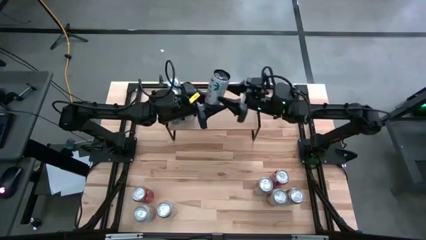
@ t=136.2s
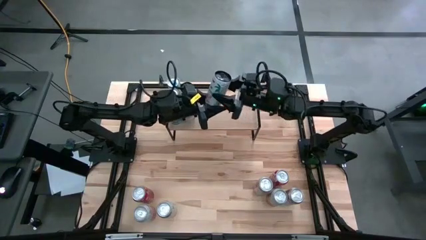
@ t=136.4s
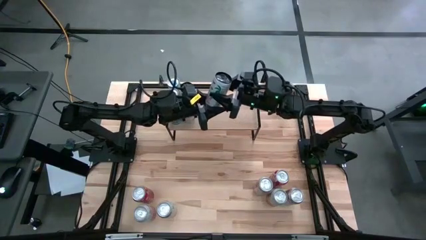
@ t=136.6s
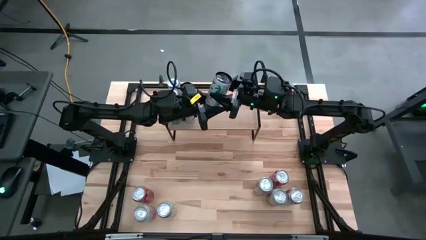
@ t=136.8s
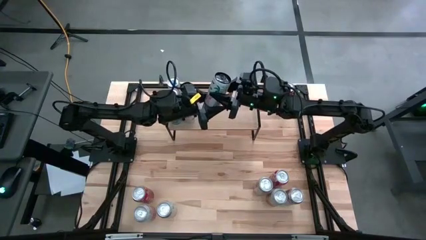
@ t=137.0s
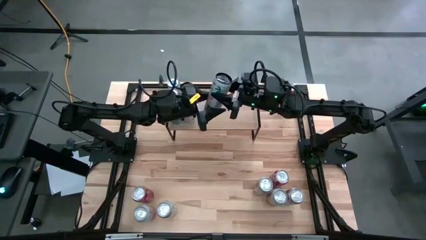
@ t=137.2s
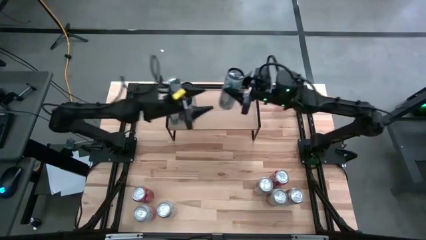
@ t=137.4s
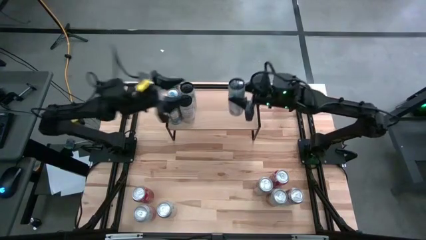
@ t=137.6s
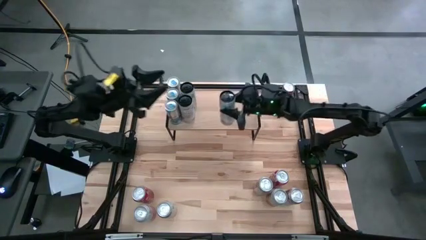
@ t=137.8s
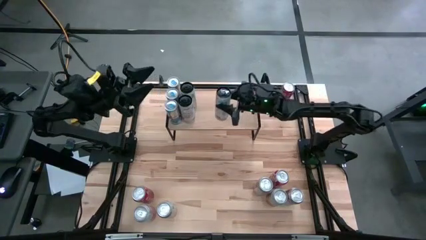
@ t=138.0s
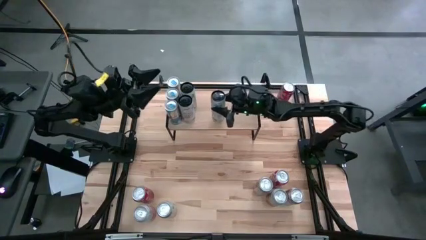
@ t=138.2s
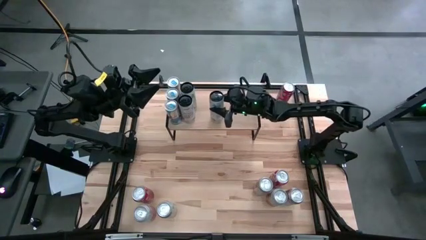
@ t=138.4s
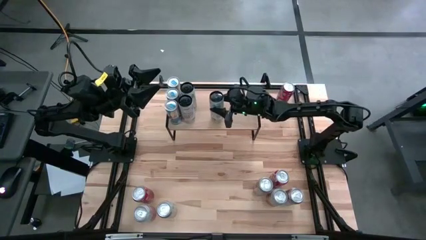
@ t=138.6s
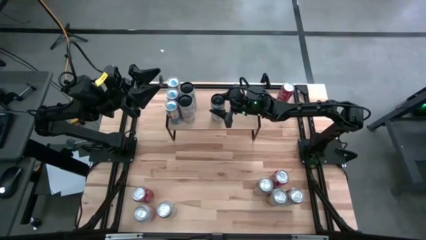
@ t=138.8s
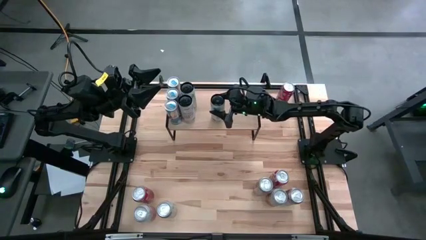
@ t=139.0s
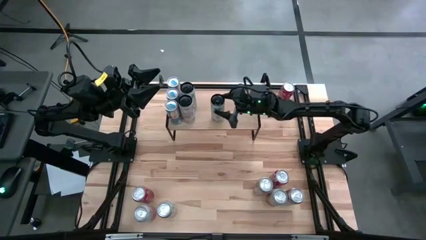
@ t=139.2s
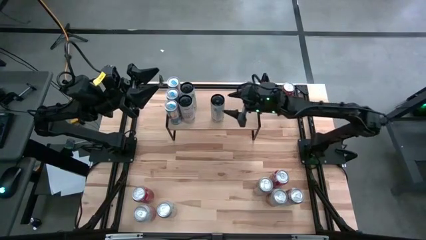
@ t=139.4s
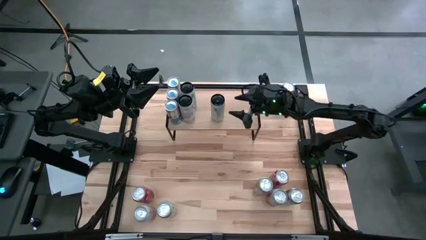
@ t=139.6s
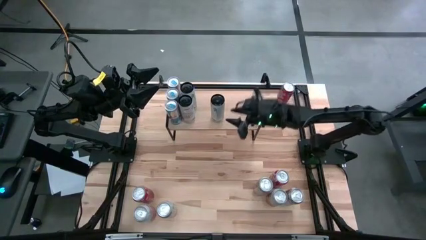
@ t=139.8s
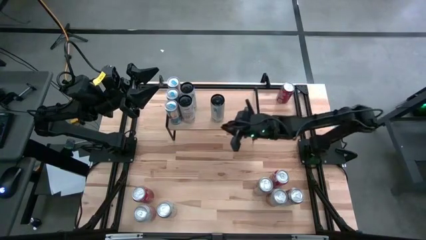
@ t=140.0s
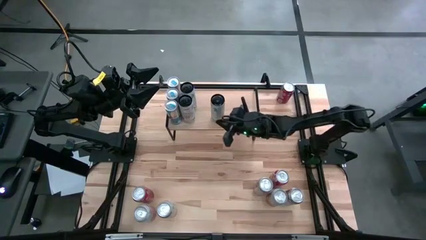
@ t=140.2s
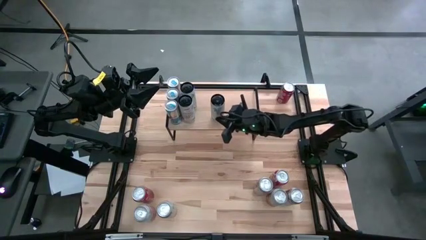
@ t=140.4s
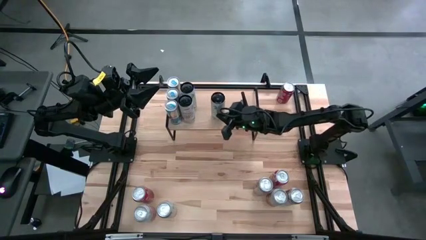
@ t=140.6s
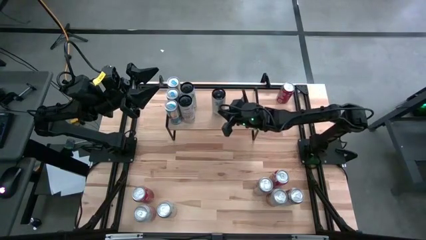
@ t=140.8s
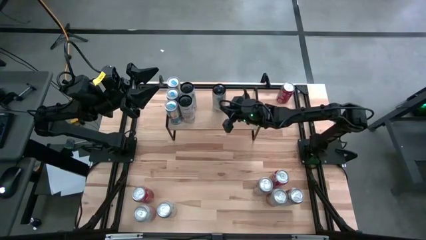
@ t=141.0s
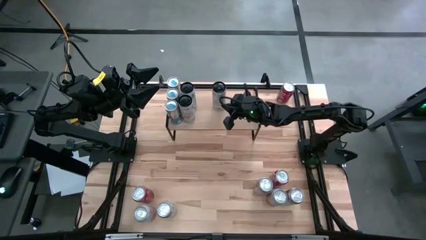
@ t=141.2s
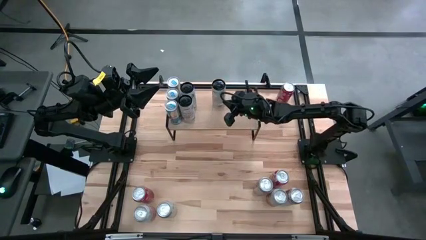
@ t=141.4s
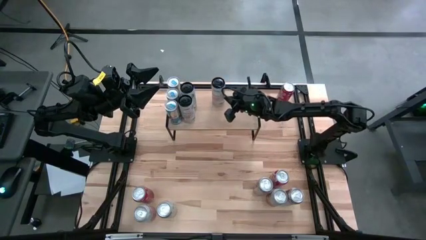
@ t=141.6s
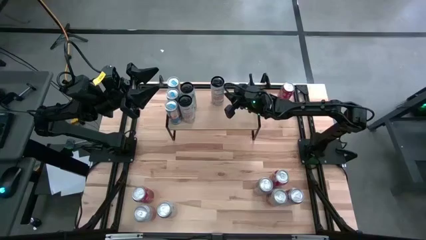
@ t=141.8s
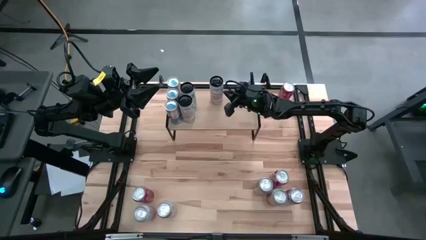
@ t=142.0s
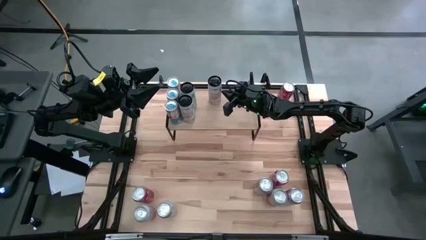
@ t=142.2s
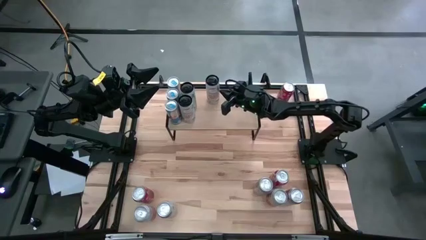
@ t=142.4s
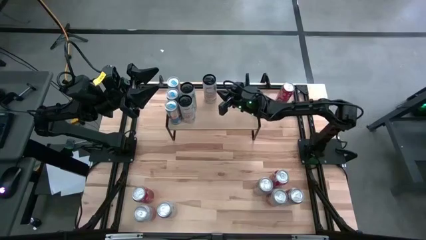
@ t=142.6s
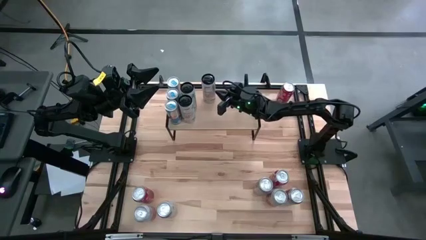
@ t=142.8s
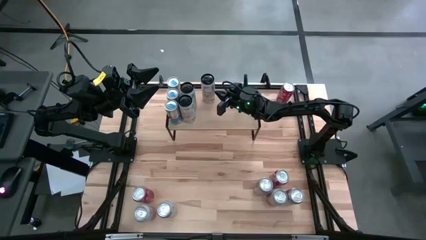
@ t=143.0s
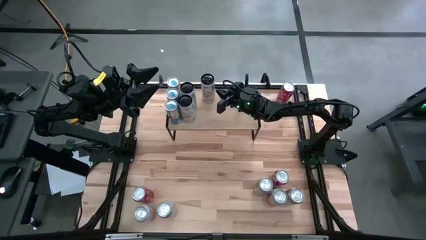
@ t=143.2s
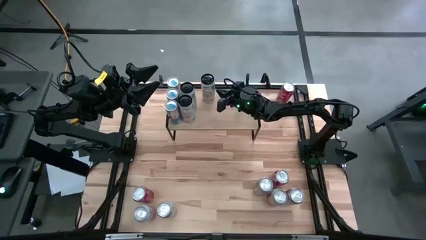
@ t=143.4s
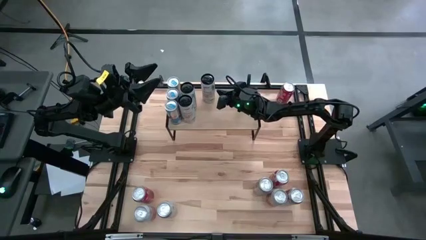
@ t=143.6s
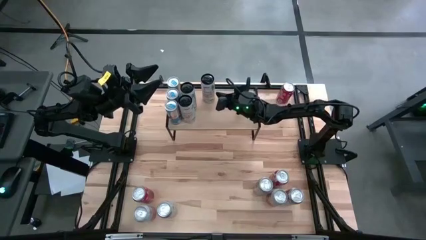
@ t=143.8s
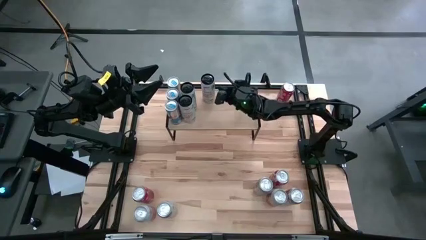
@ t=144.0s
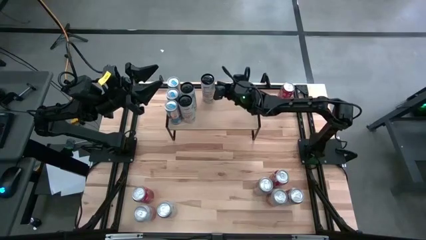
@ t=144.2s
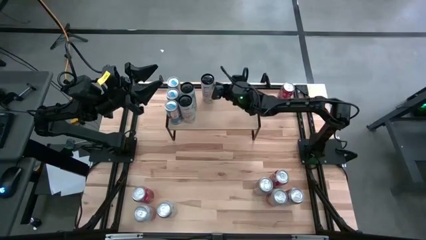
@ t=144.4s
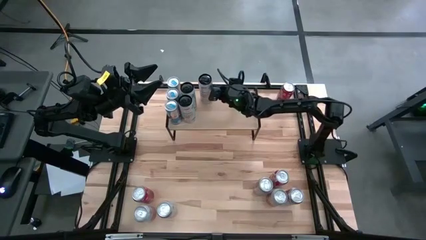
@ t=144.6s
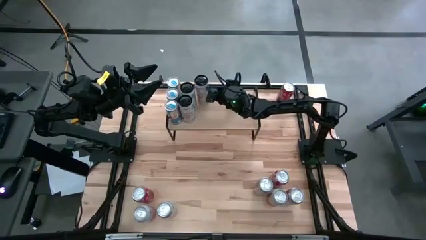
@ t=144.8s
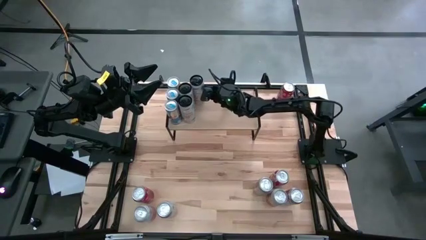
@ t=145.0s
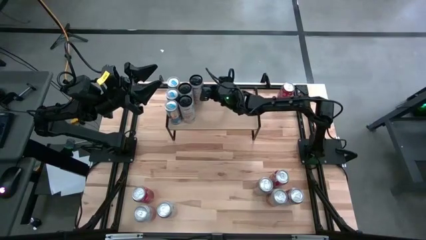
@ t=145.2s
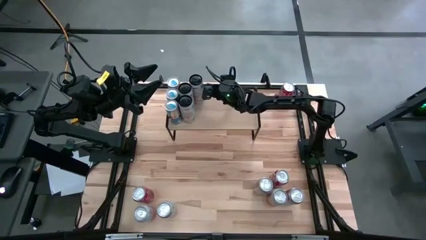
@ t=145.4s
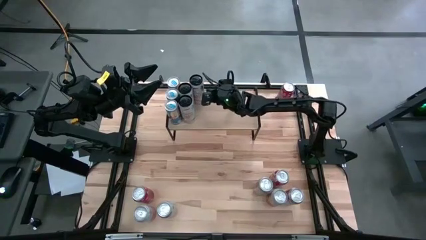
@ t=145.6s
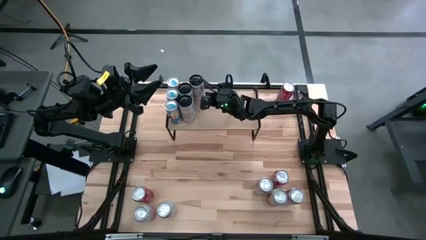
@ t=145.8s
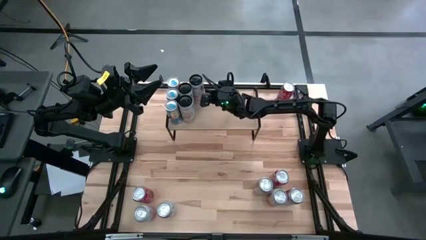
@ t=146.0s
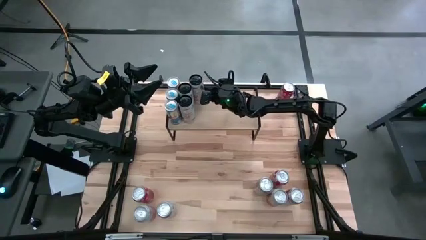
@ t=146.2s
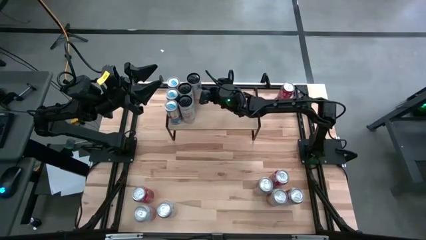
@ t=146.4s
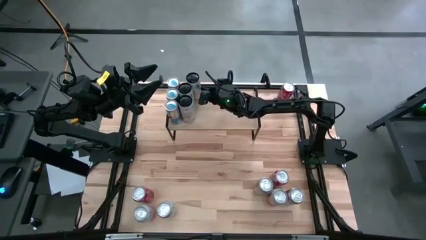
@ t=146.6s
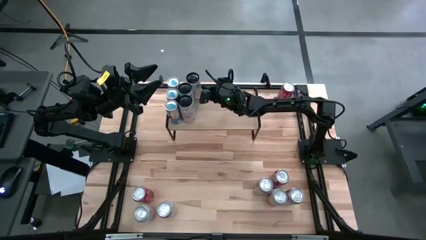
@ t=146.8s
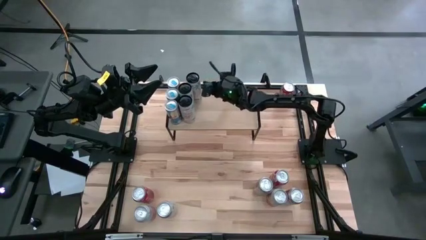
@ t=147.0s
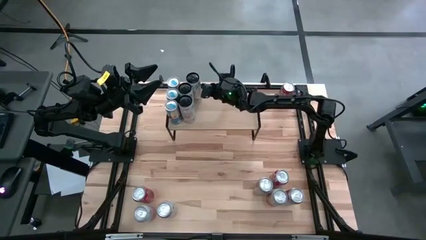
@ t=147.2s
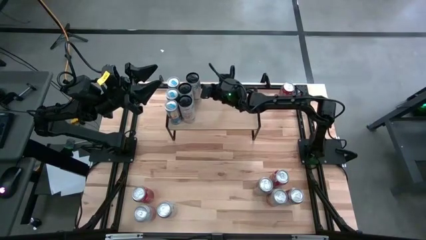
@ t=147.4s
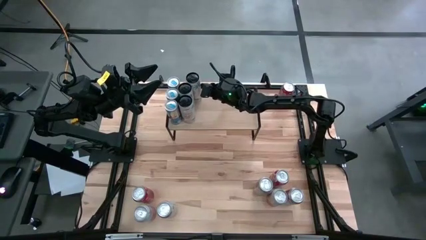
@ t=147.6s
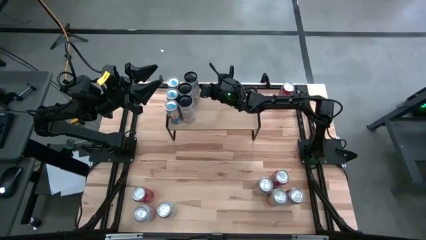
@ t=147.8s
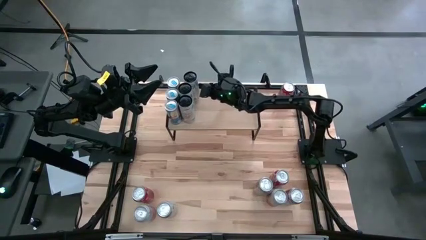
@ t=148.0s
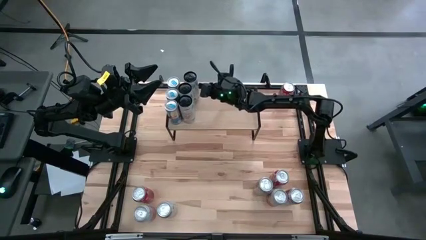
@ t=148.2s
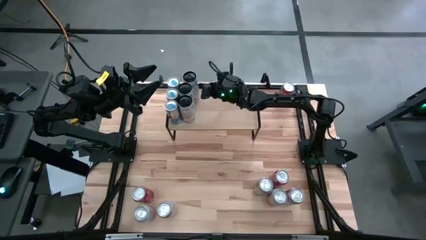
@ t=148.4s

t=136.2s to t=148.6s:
Task: Place canned beverage on shelf
Put the white-pink soda can aligned with the other white-pink soda cans on the shelf
